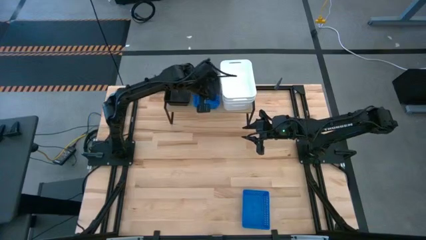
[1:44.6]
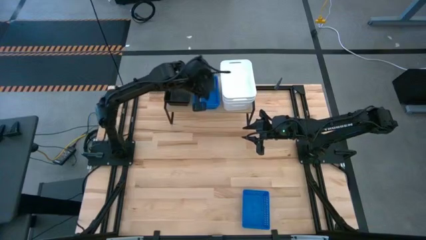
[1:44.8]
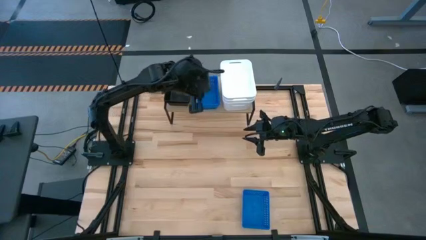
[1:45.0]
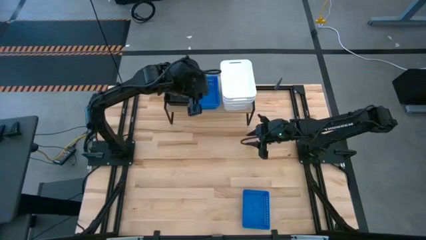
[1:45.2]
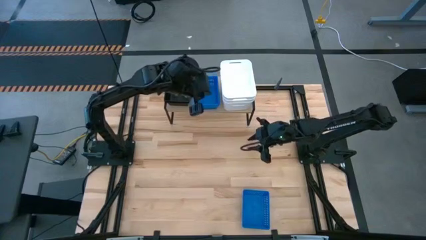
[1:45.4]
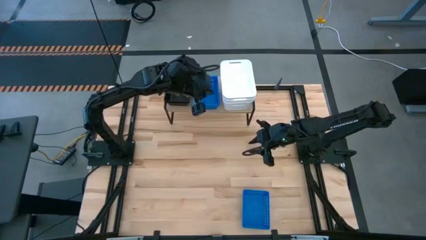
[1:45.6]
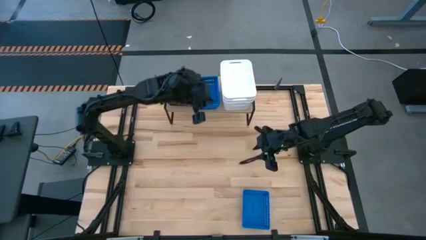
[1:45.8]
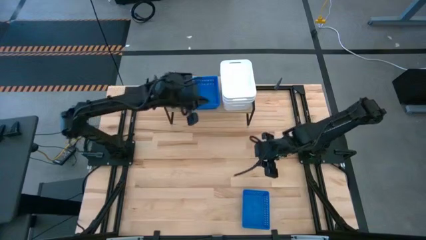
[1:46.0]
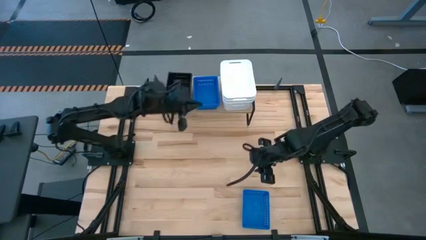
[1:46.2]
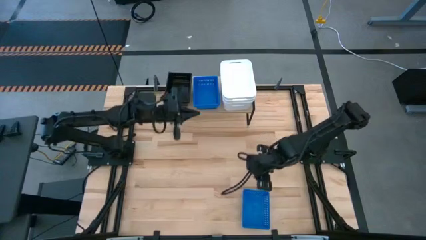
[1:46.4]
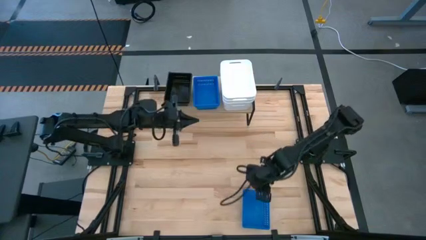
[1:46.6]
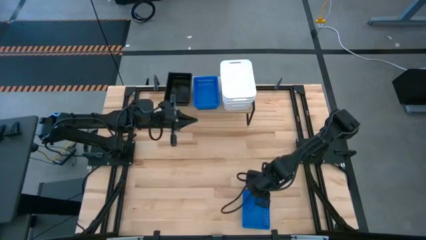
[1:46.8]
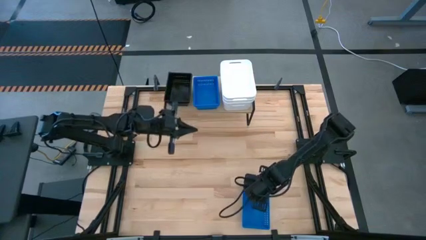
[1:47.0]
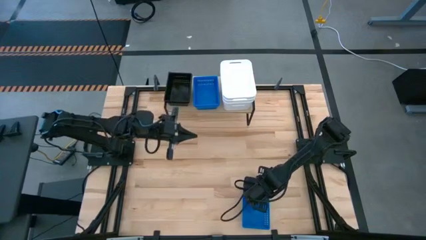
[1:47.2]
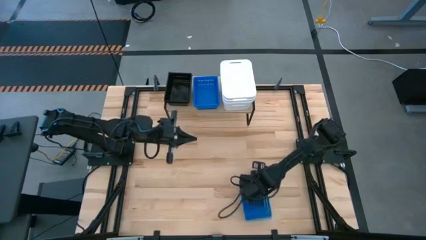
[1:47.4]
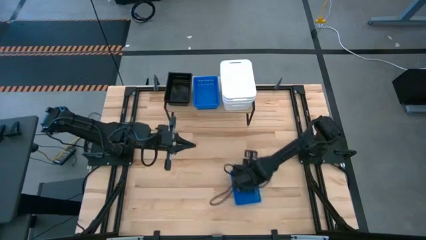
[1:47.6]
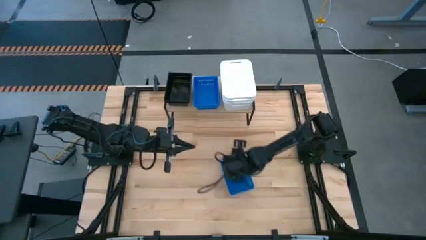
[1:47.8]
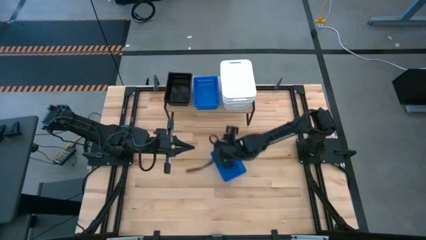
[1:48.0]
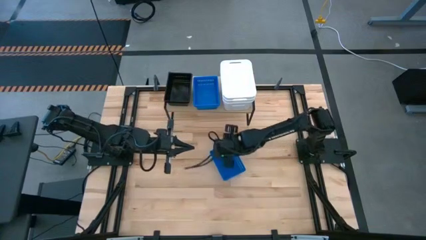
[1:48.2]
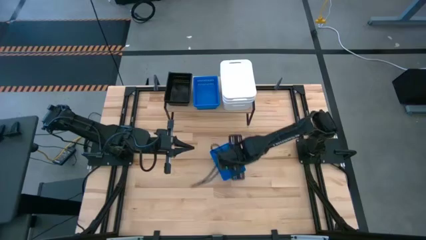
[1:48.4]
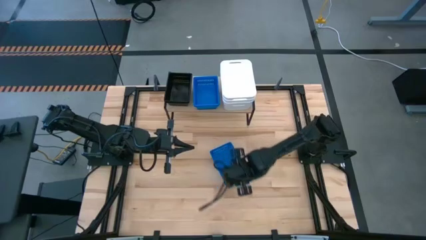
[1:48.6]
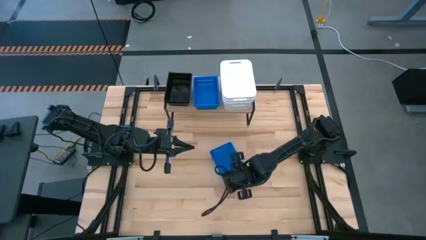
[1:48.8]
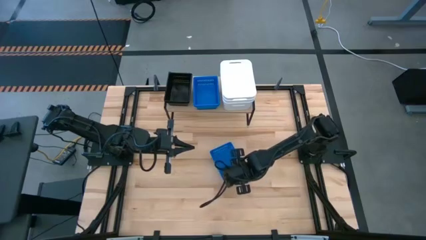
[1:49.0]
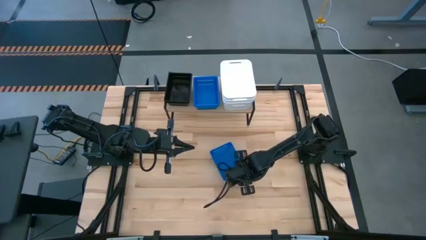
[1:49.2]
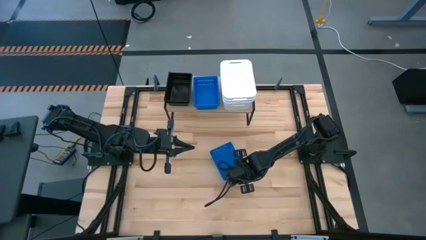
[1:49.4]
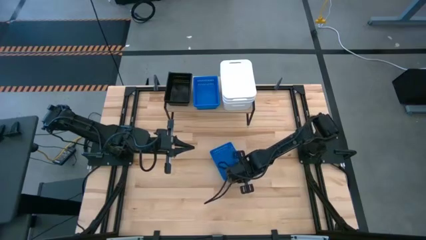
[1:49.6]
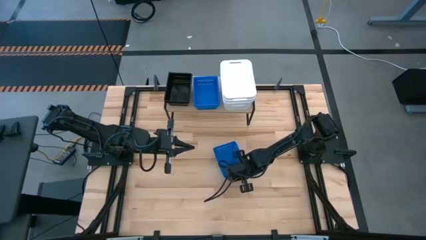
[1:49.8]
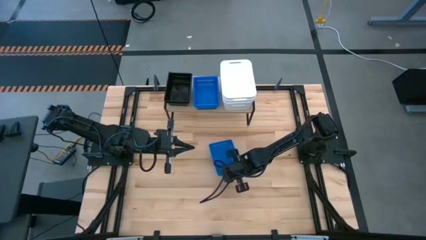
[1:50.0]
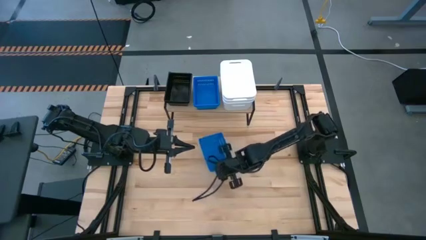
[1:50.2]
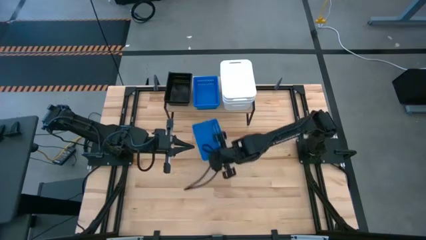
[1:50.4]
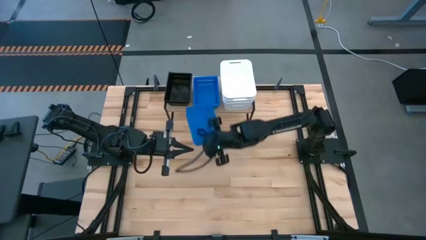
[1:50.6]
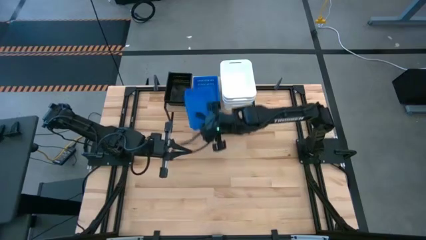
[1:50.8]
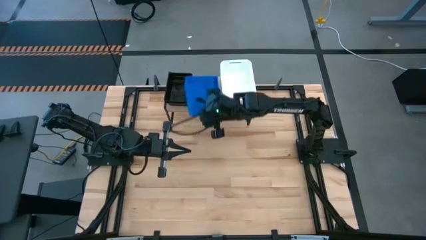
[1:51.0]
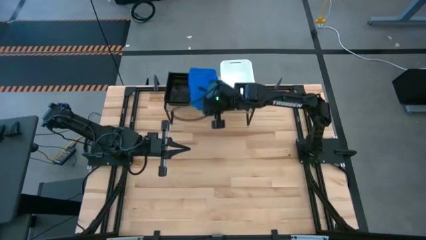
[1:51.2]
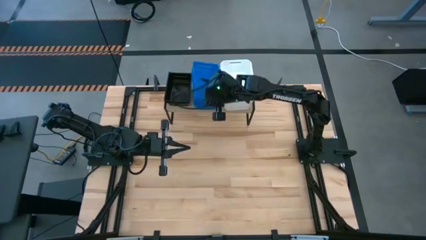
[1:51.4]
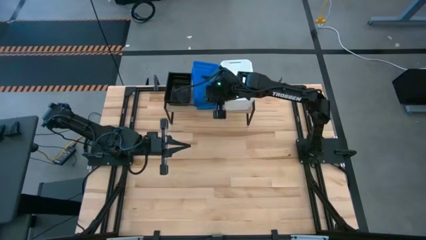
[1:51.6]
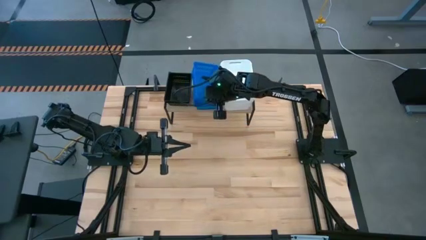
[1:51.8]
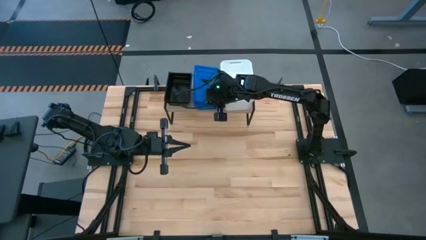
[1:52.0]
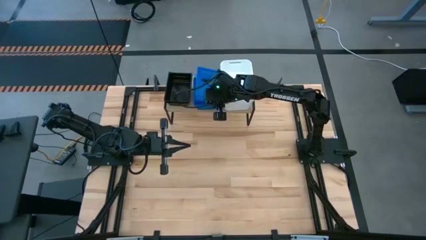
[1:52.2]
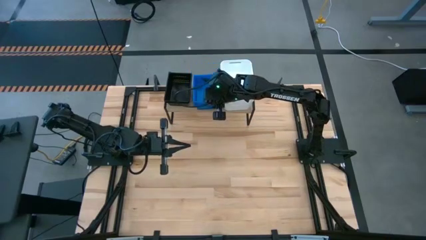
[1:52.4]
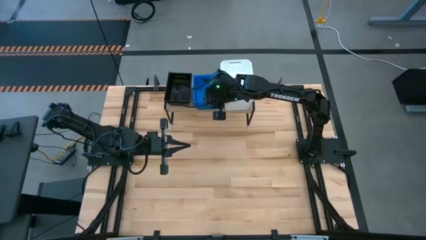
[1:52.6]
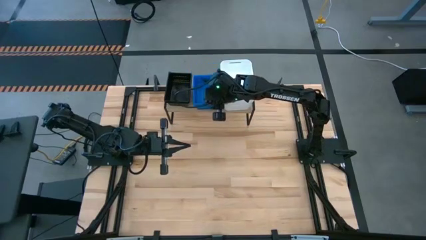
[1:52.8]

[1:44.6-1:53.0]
Task: Stack baskets on shelf by color
Stack the blue bin on top of the other blue bins on the shelf

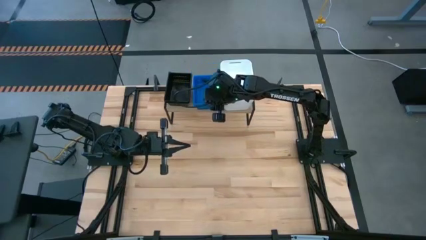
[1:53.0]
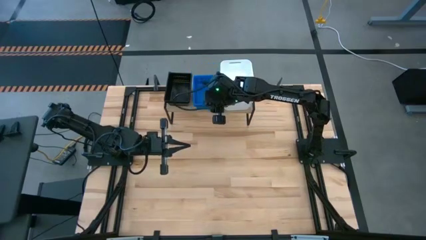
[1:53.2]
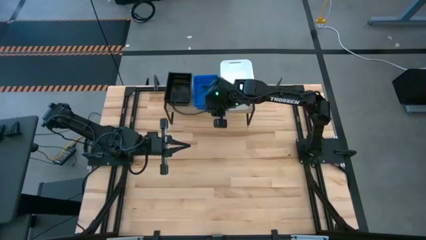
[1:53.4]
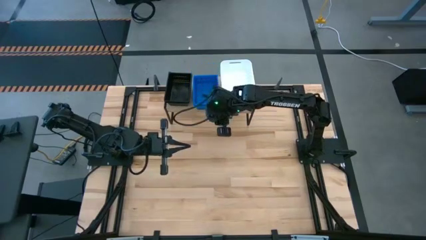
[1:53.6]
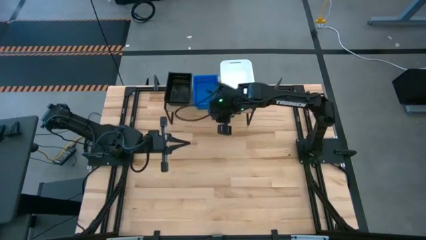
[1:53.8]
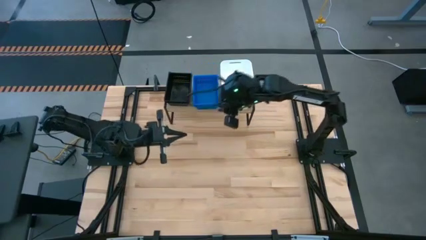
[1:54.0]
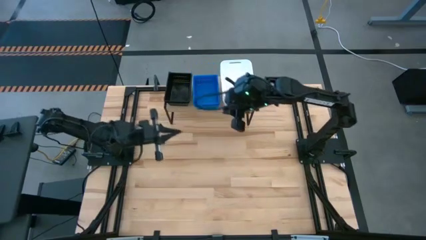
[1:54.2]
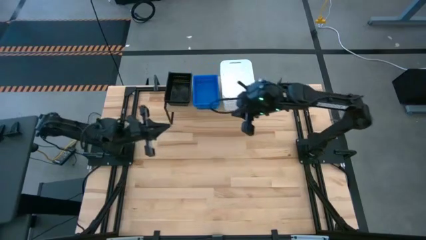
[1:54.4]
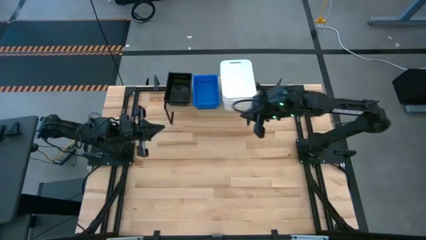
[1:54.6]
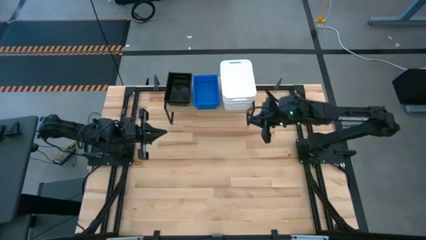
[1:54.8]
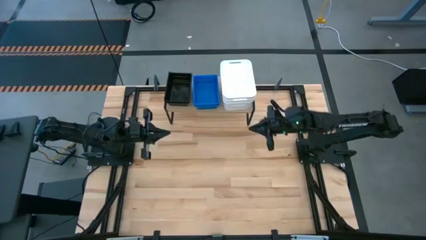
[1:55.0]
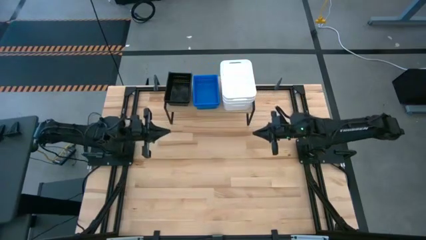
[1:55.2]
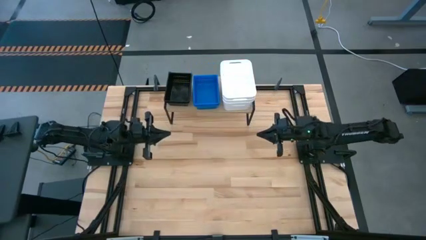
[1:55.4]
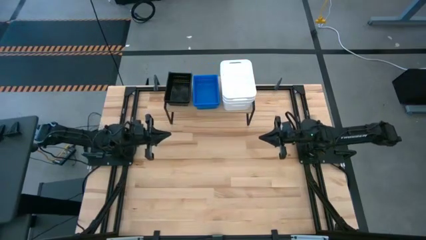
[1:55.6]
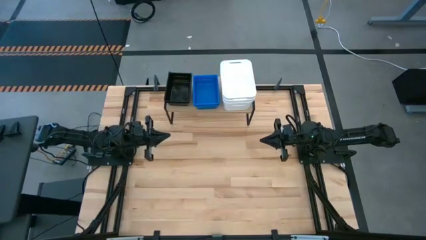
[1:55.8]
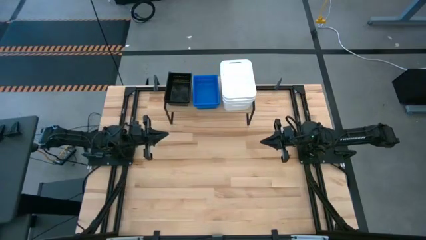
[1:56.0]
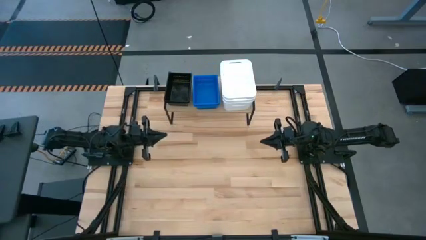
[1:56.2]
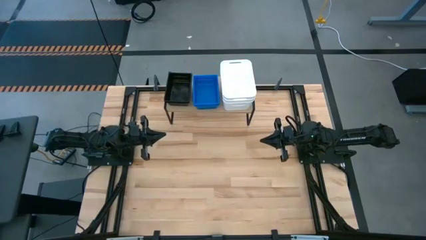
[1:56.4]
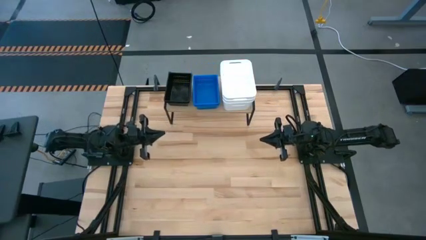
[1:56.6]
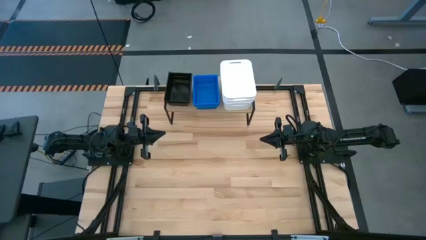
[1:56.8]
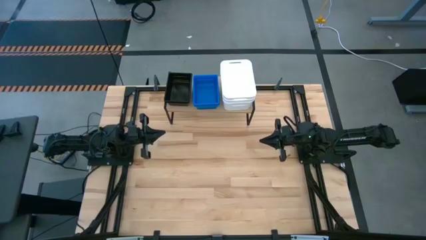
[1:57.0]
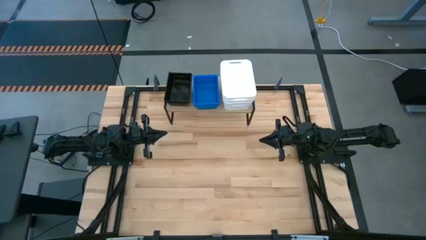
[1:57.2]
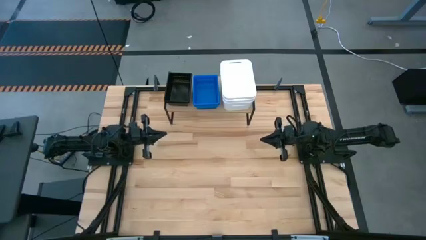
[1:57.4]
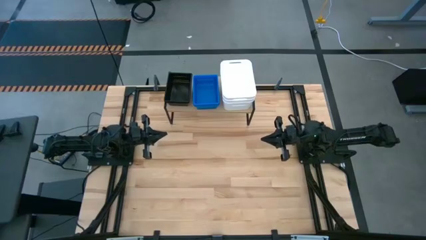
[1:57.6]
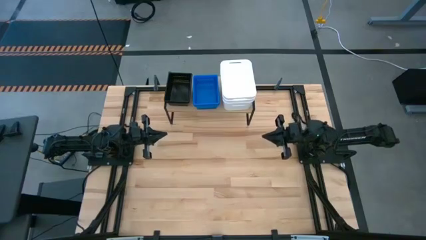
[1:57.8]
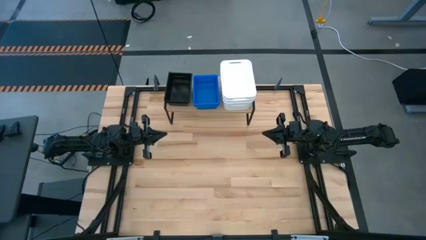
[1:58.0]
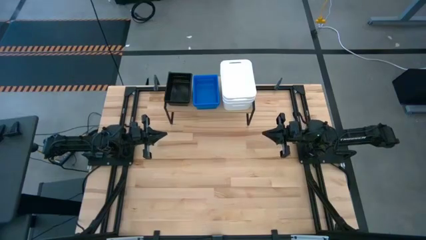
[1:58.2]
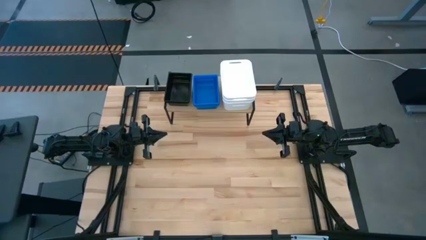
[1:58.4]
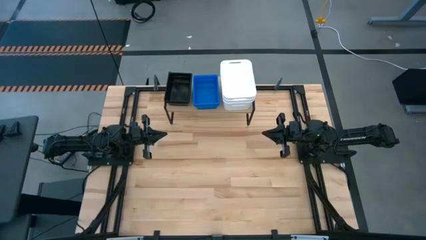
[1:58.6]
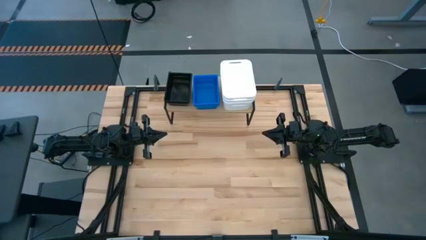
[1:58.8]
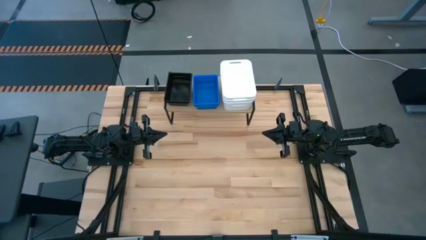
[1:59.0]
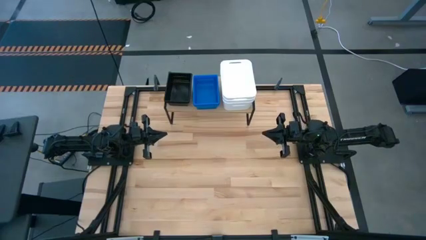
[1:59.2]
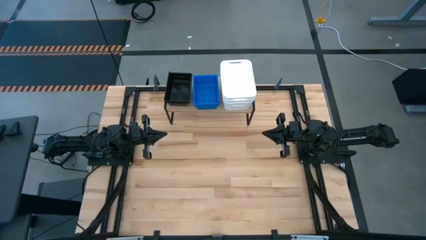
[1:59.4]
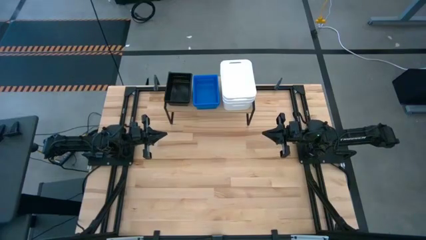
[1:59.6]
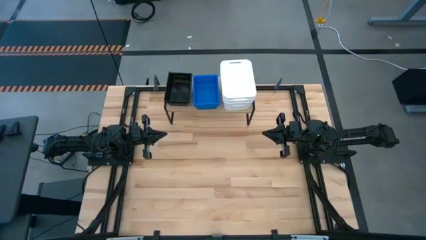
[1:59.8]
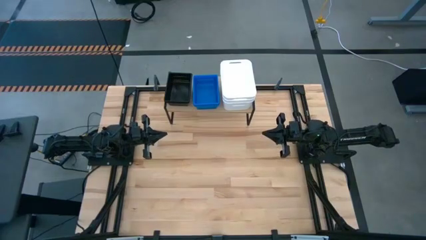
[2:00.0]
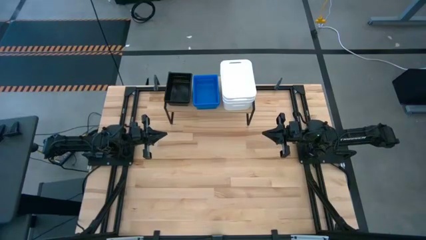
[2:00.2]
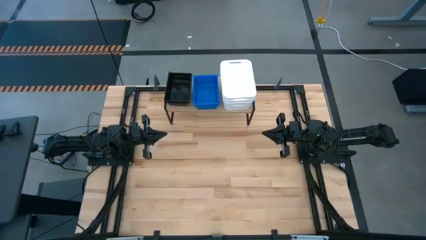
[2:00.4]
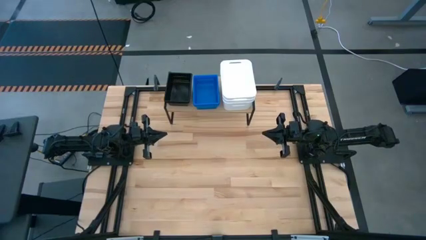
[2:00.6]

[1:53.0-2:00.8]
Return to Home Position
